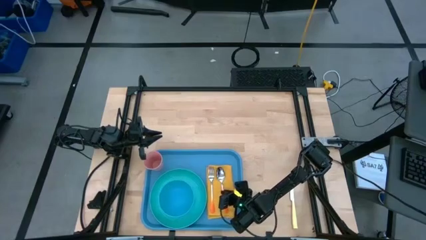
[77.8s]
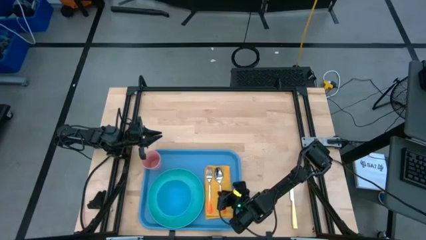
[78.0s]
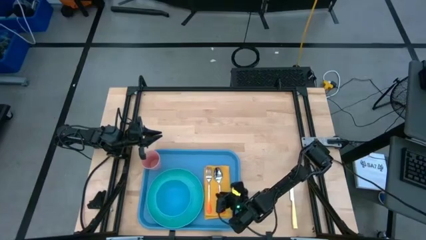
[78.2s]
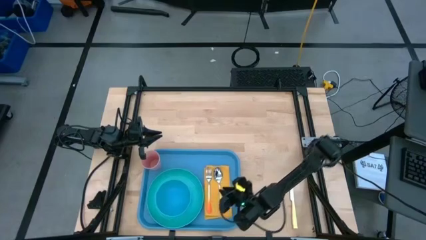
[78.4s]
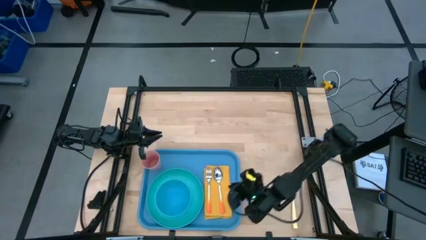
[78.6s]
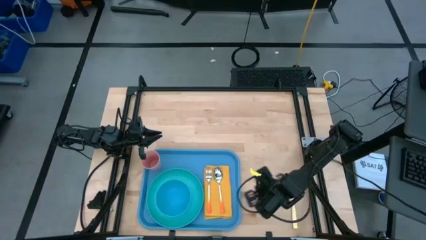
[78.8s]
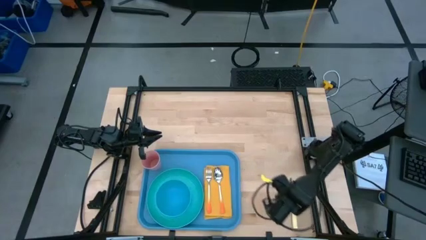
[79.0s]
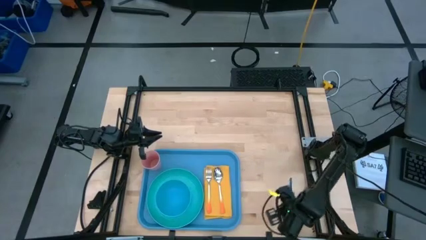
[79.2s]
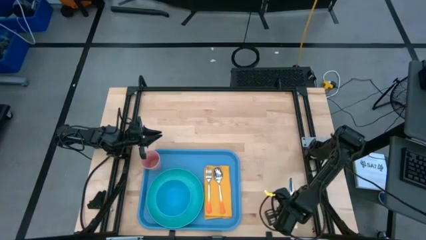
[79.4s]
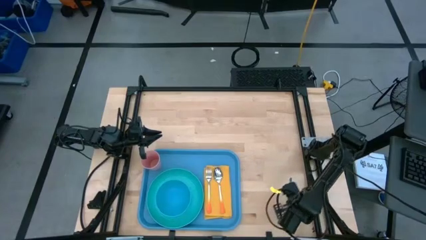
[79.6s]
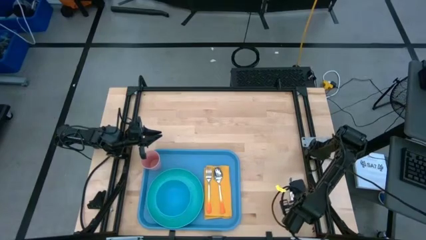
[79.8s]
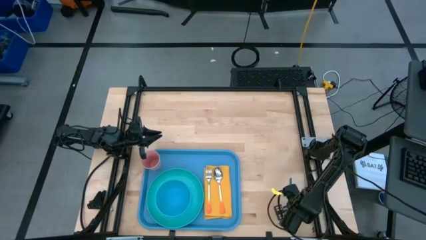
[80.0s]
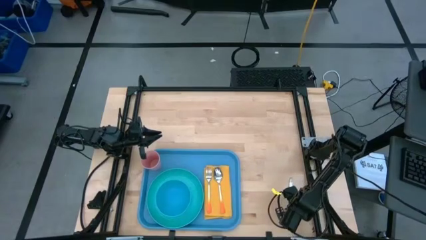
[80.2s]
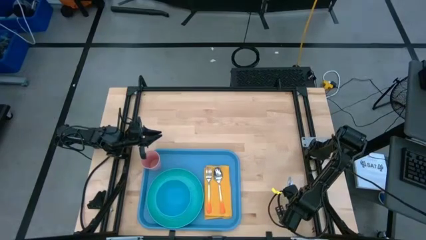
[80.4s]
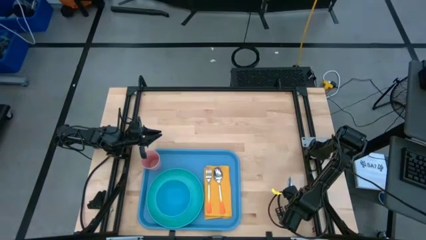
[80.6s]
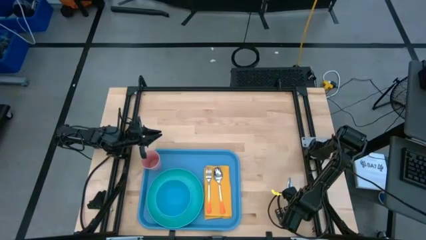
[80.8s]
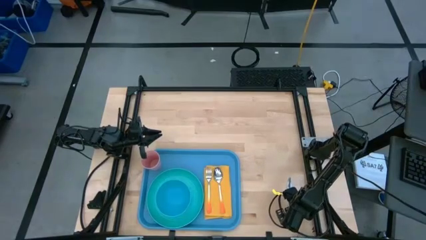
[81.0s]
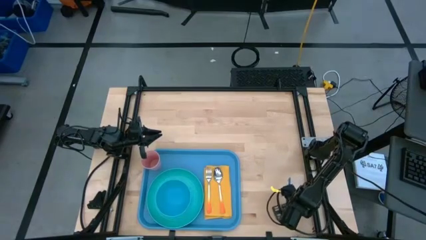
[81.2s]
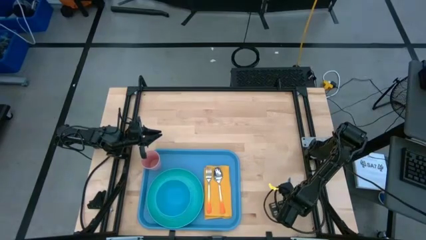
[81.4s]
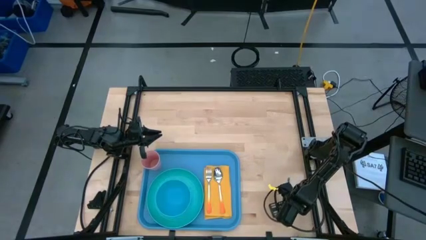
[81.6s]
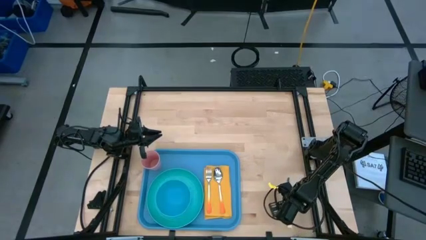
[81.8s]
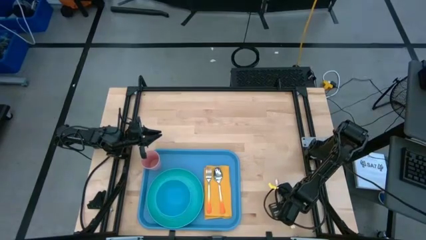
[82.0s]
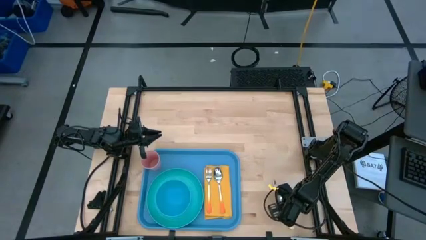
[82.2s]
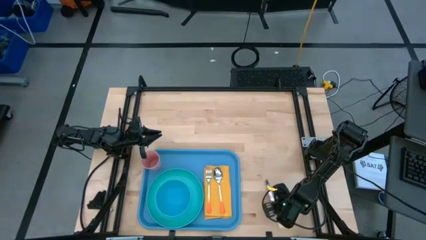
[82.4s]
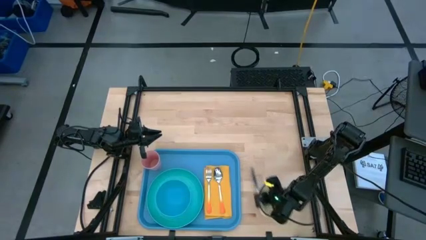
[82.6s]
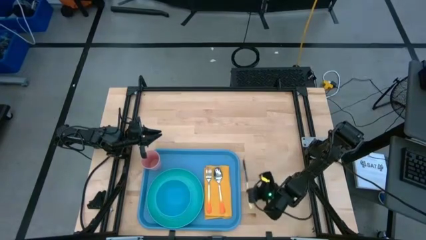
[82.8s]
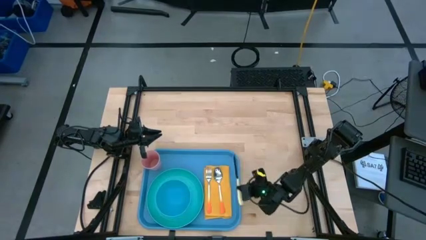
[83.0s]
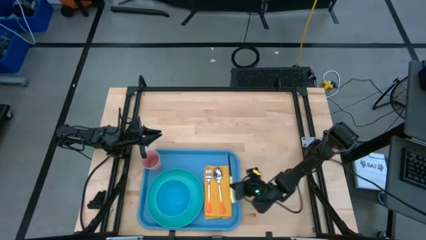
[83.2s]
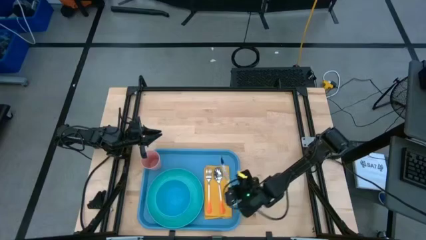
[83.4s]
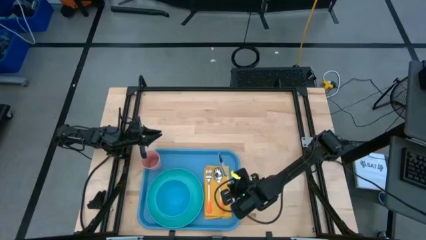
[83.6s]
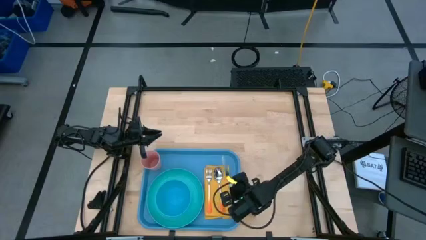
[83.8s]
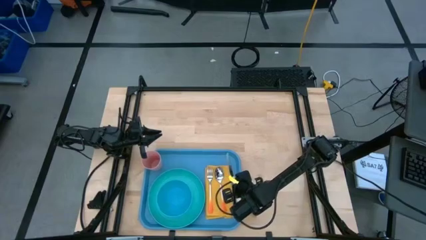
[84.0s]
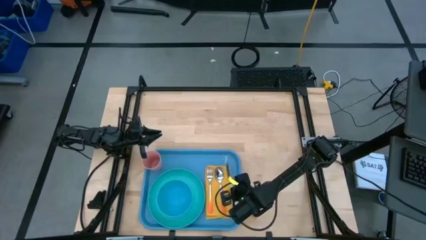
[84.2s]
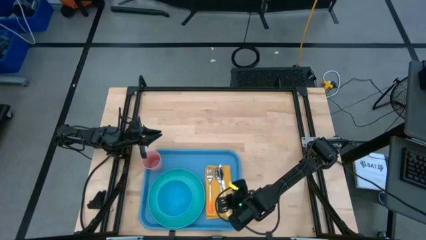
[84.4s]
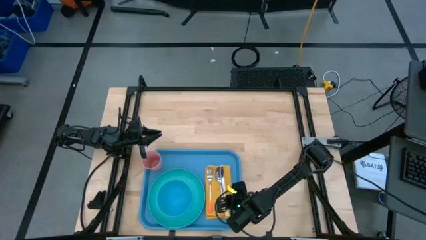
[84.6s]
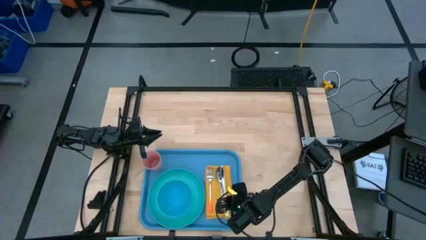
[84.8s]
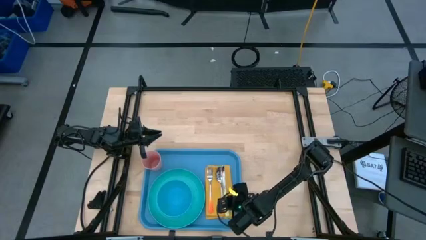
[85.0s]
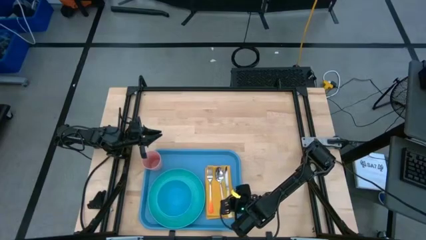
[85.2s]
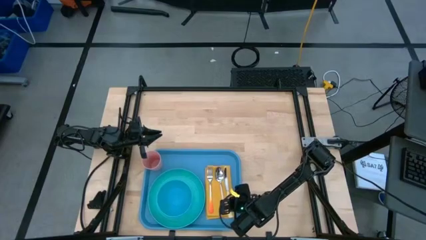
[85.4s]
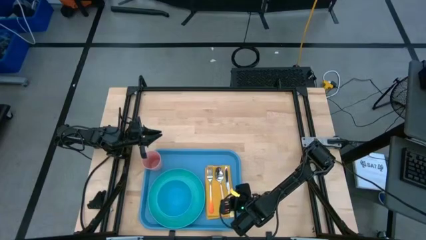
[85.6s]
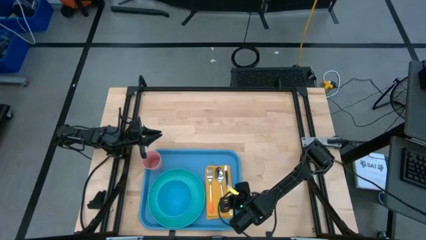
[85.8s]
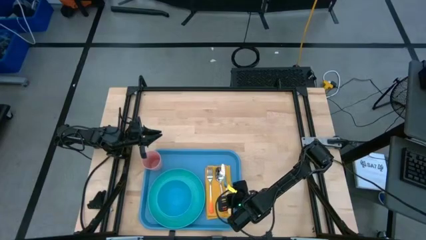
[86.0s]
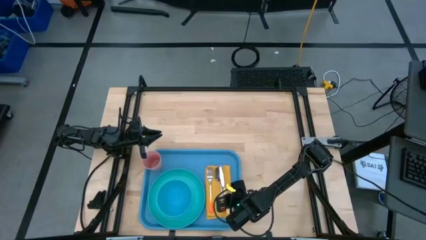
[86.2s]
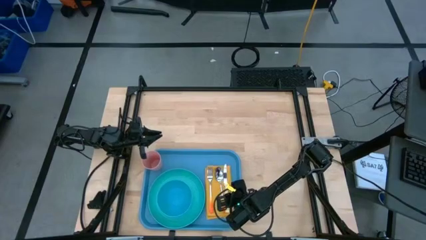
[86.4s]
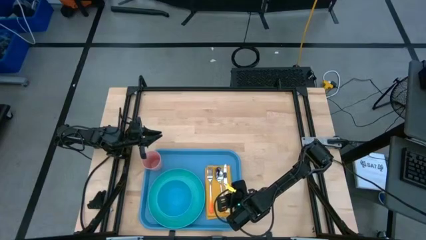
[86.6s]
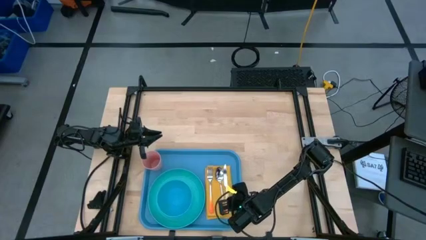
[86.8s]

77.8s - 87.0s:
Task: Set up tray
Put the yellow knife on the yellow napkin

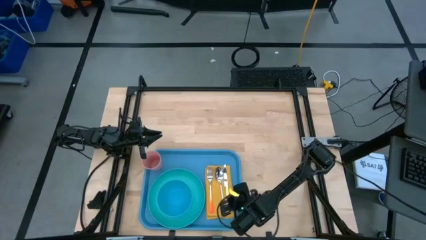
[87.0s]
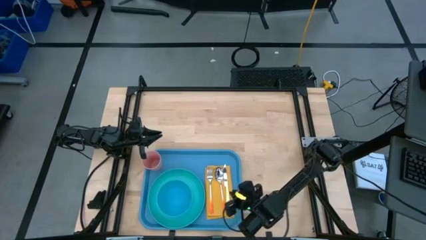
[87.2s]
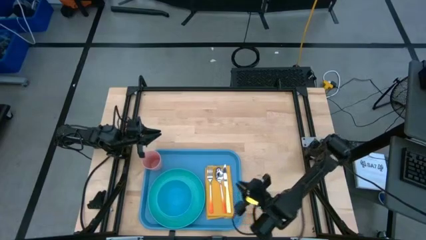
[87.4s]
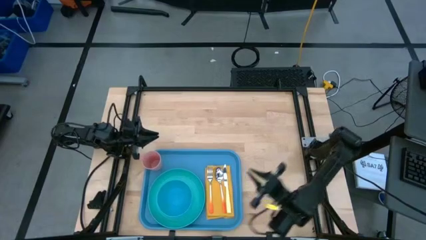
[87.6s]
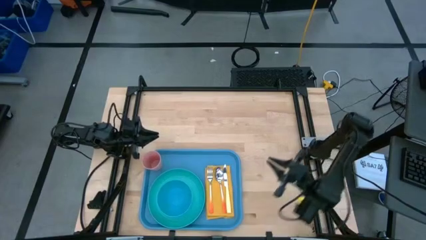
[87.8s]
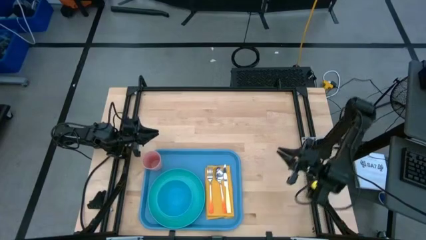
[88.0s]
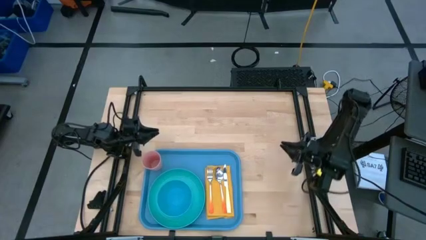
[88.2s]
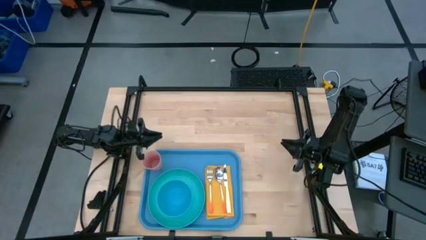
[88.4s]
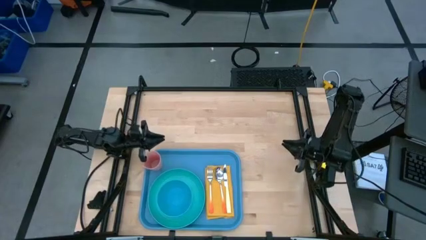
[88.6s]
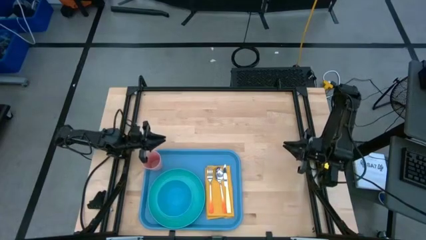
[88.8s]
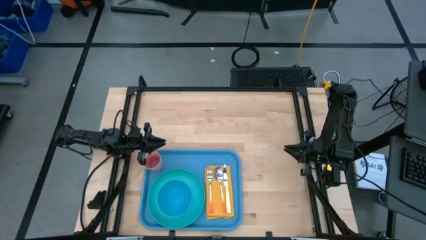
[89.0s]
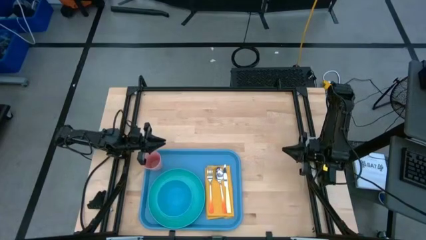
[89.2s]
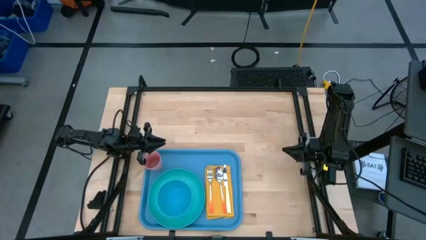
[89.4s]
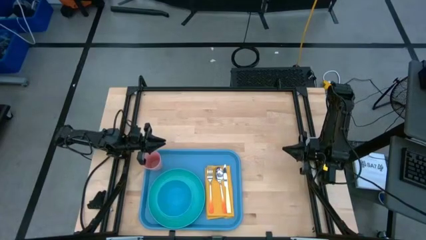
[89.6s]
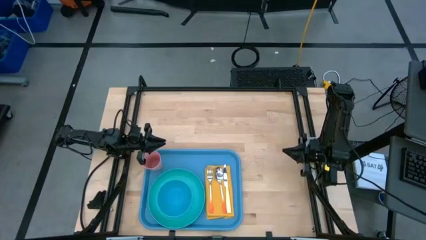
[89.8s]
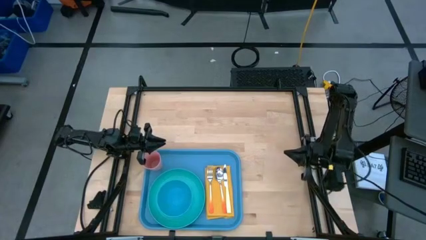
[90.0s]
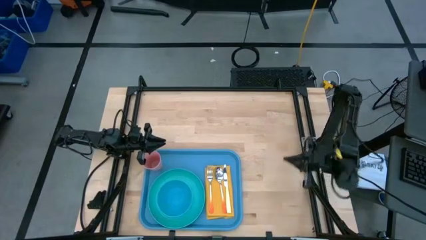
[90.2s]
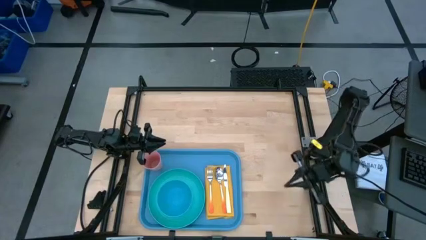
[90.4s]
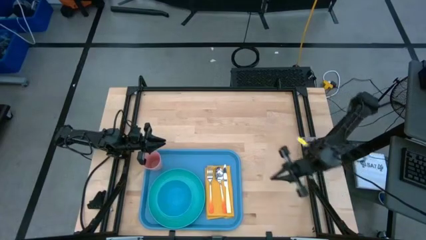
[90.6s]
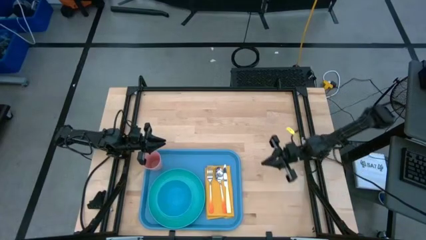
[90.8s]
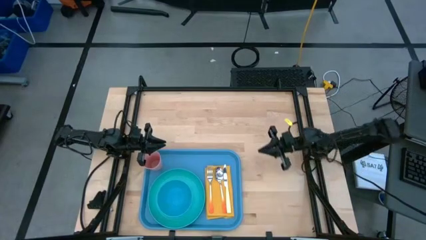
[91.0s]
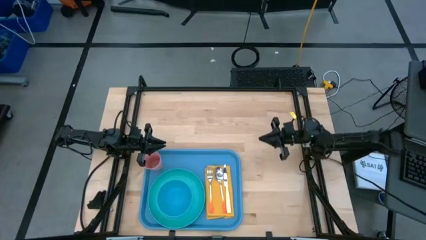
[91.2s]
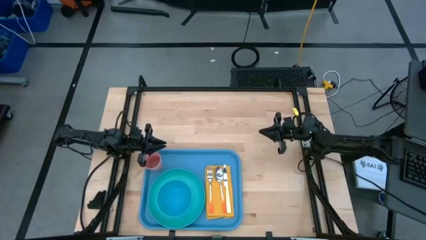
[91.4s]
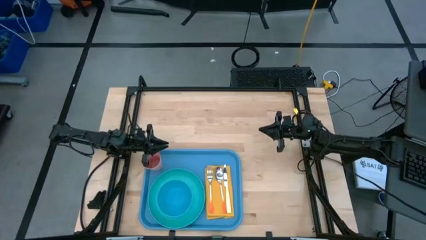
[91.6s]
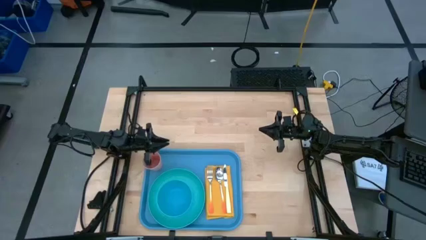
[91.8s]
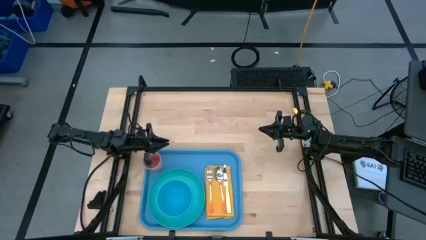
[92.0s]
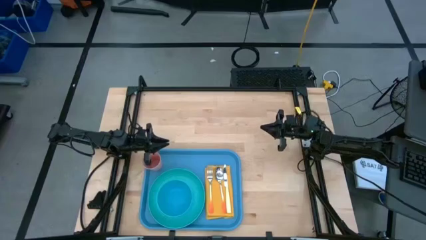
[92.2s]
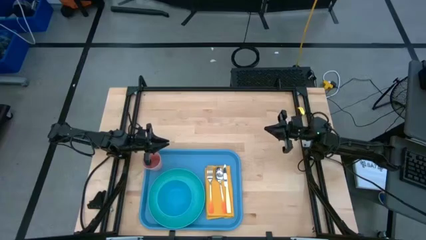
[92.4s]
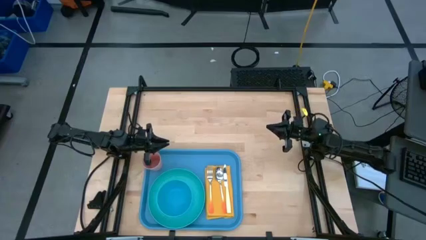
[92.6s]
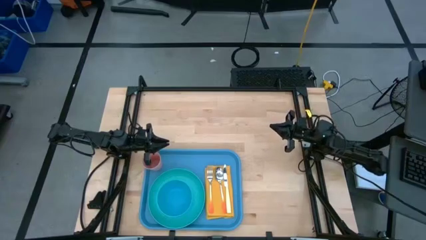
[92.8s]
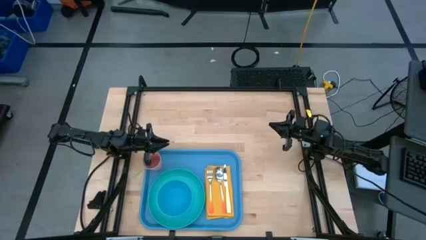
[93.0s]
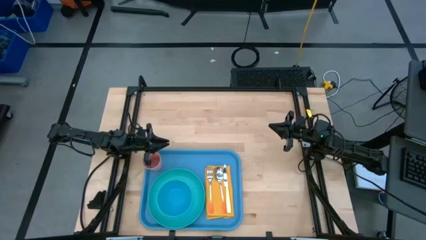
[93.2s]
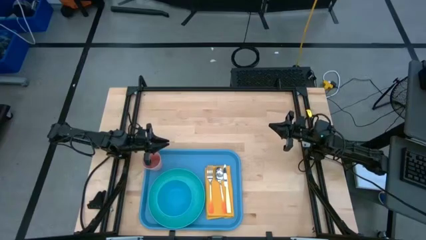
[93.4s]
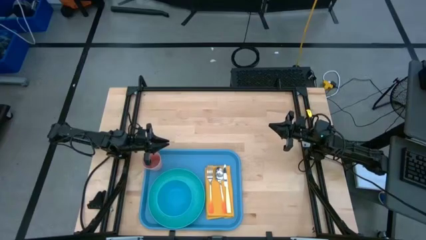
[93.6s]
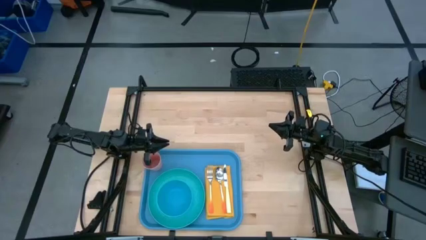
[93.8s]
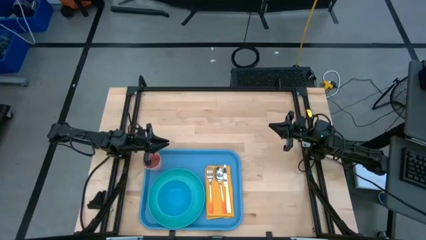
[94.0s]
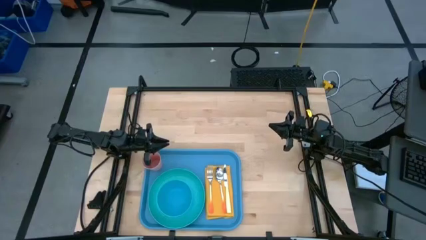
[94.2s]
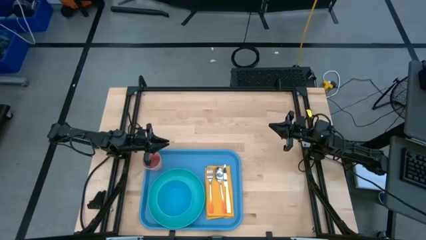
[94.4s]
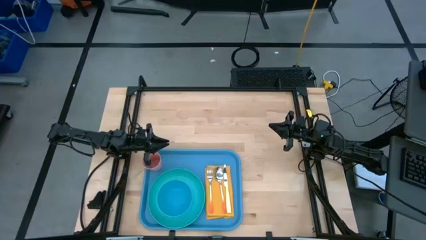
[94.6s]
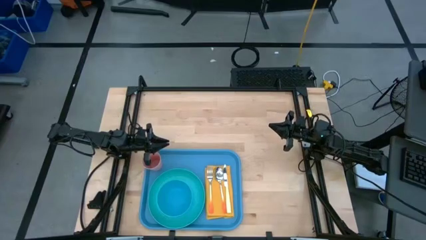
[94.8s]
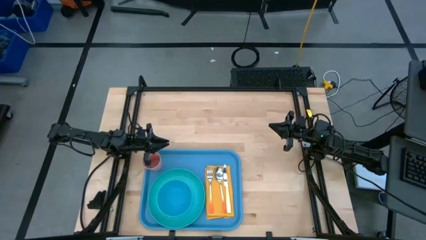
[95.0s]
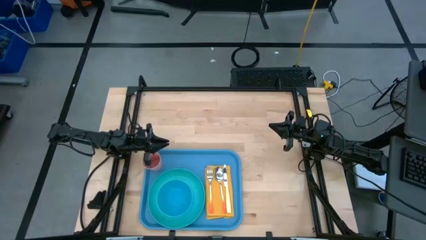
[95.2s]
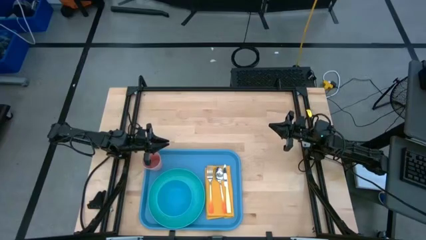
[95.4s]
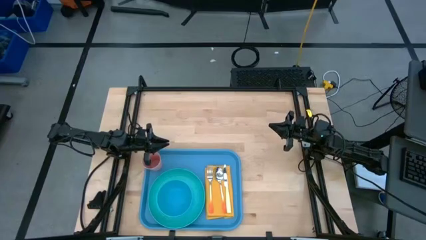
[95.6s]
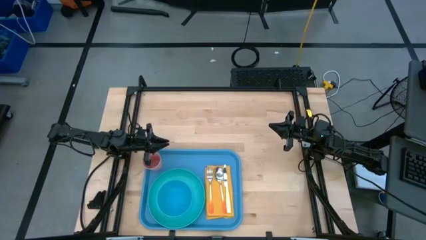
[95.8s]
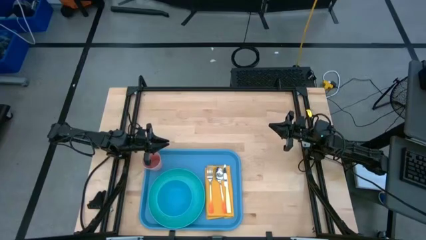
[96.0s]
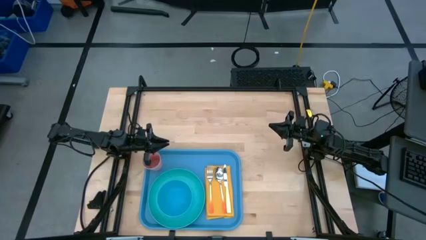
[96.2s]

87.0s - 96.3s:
Return to Home Position
